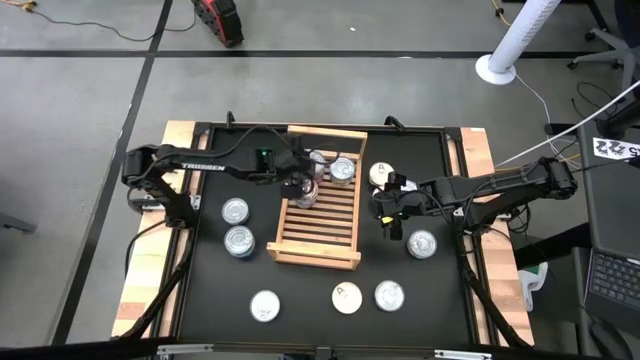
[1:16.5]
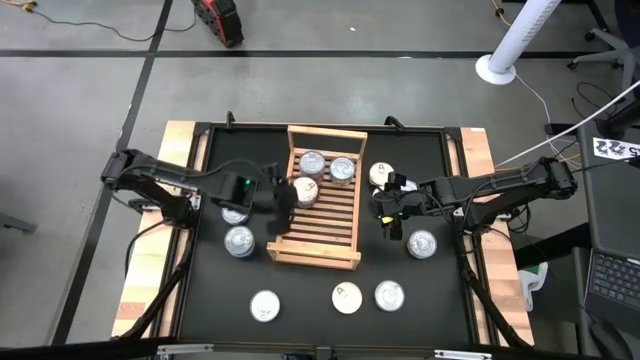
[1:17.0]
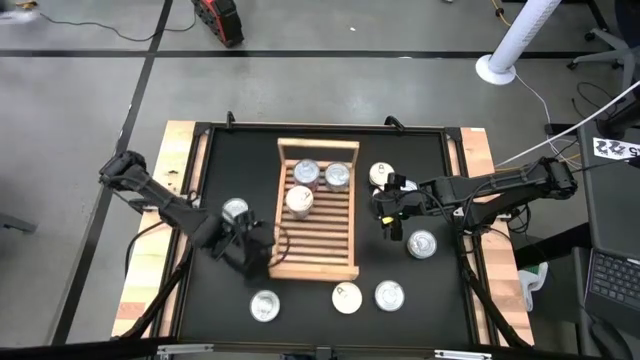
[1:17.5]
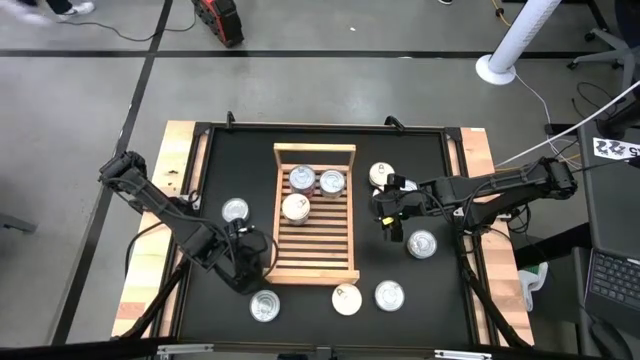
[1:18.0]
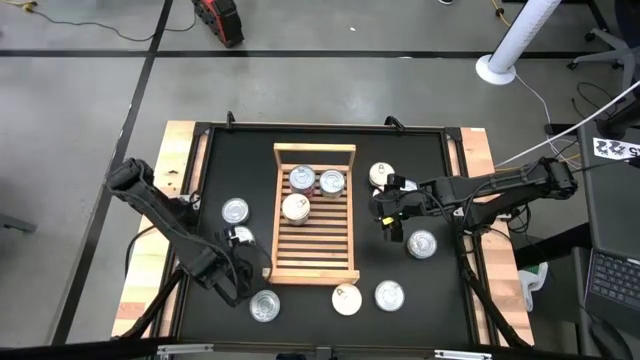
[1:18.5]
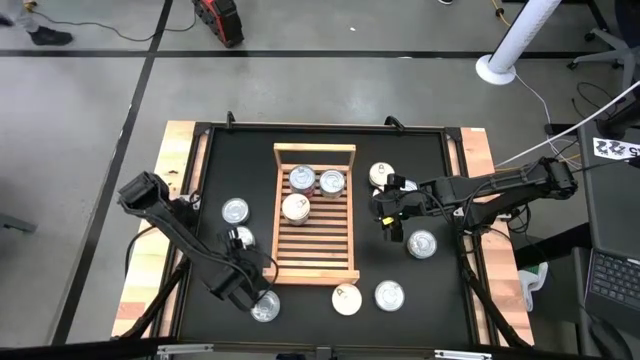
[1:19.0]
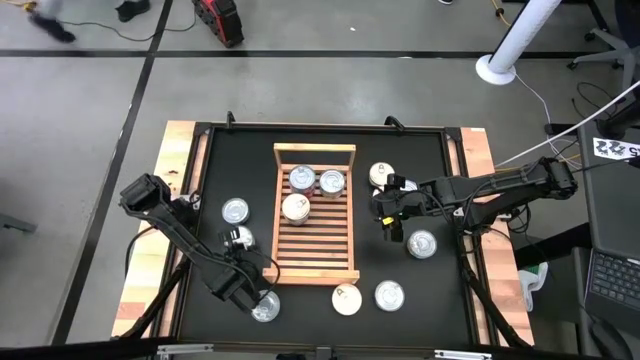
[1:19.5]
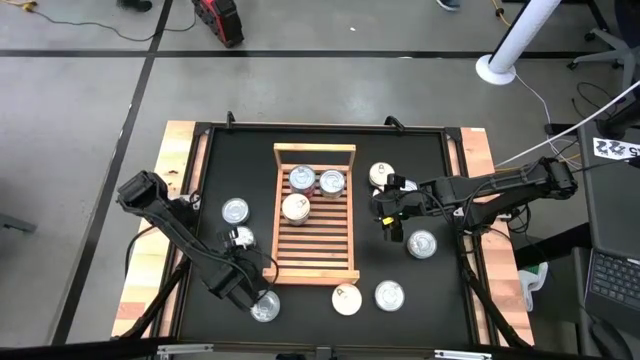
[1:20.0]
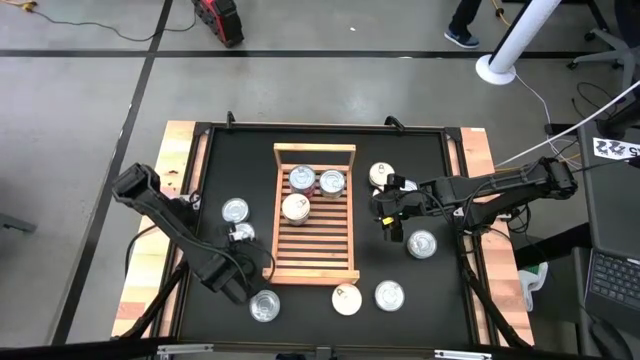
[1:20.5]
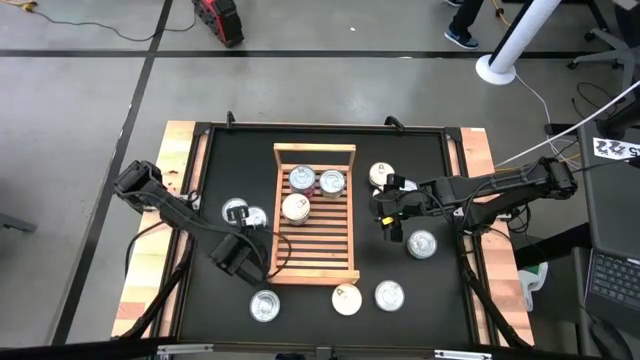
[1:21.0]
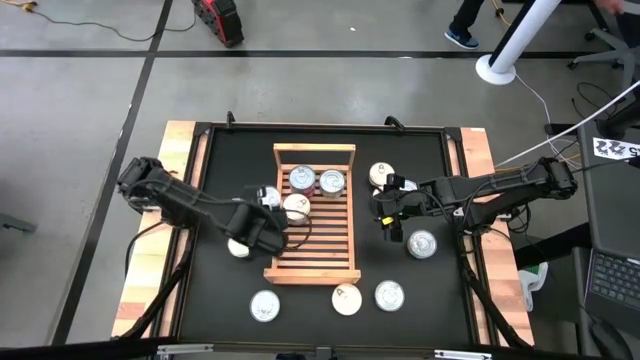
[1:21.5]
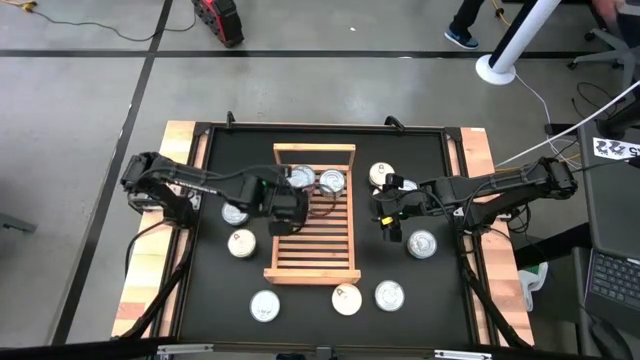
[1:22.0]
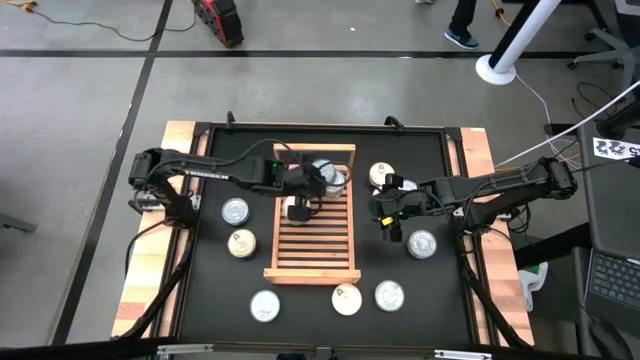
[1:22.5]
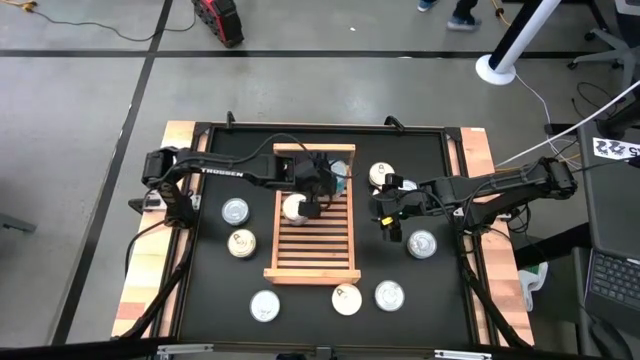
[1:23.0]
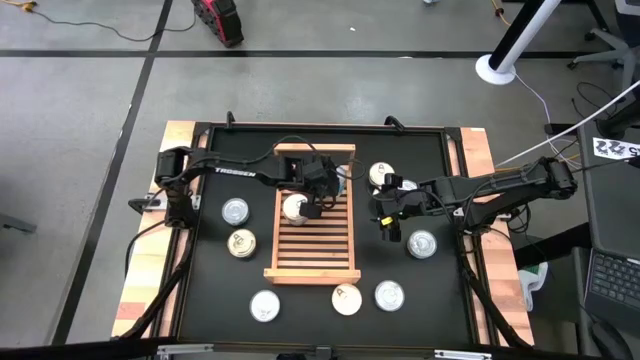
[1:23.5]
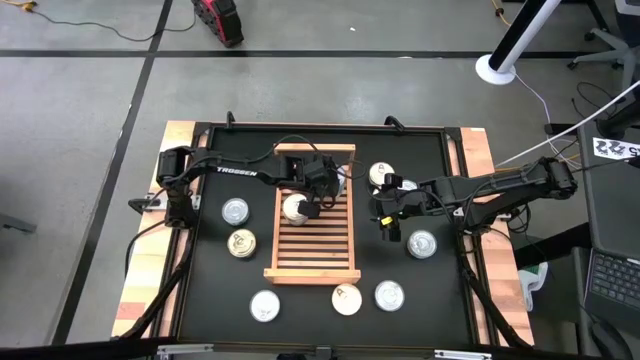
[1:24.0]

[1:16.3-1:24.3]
Task: Stack canned seafood by type on shelf
Stack the yellow and blue tuna can on top of the other yellow and blue tuna cans on the shelf

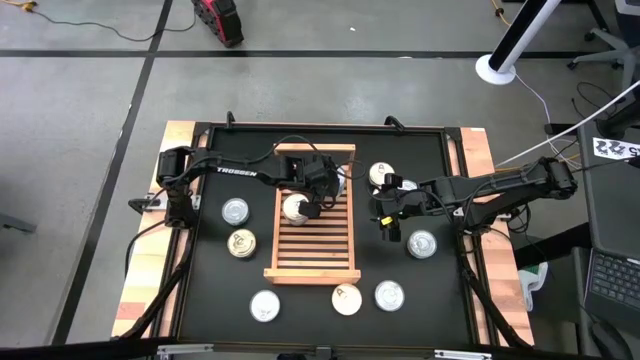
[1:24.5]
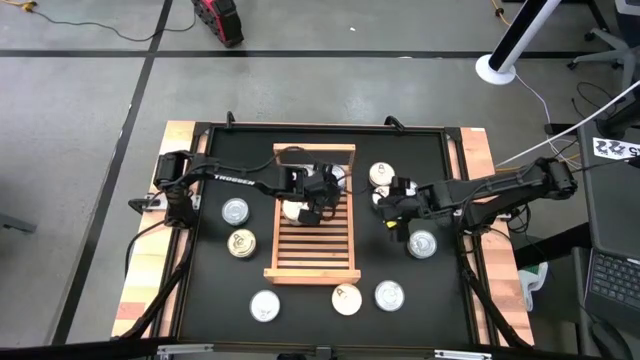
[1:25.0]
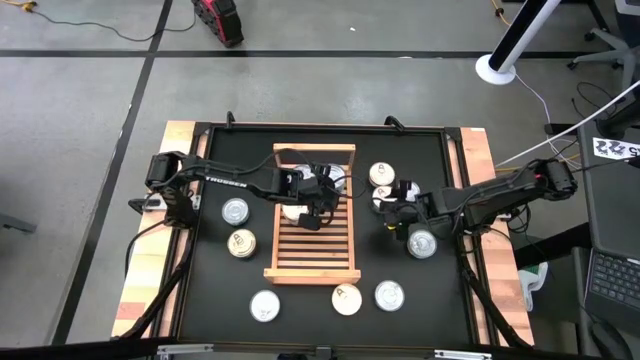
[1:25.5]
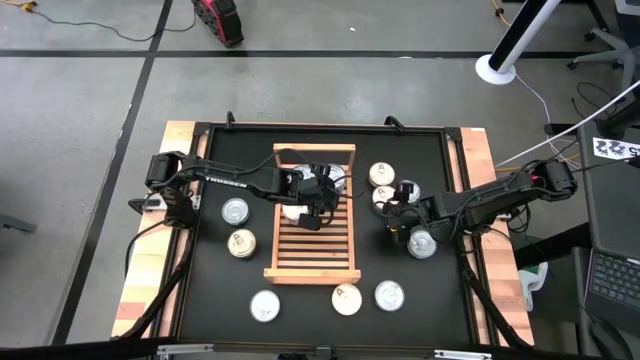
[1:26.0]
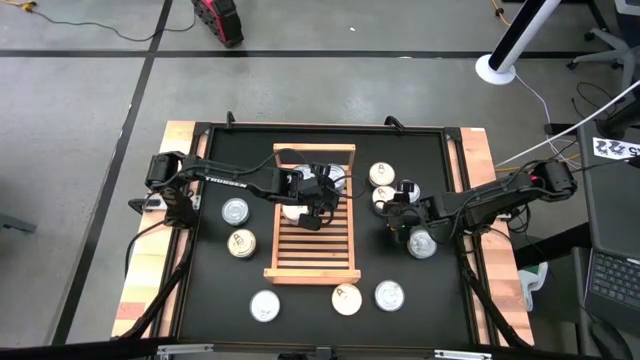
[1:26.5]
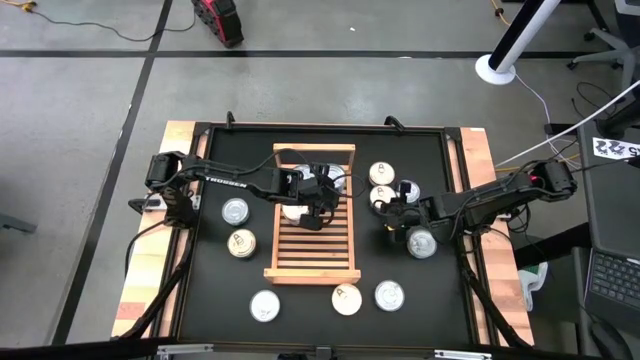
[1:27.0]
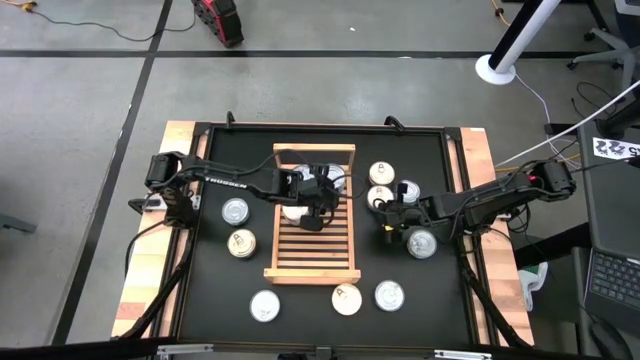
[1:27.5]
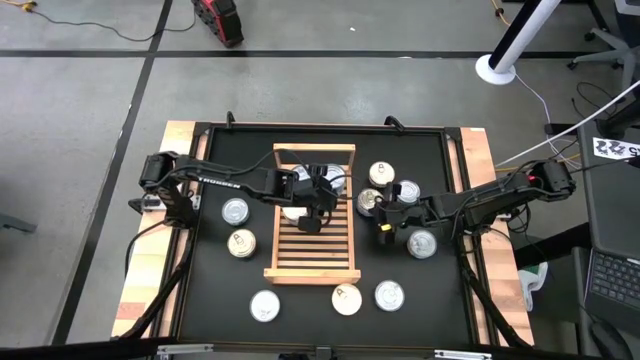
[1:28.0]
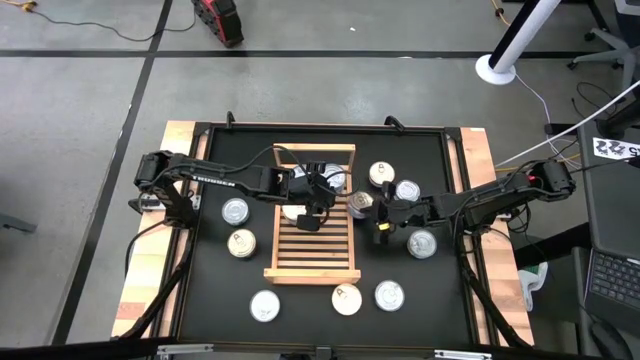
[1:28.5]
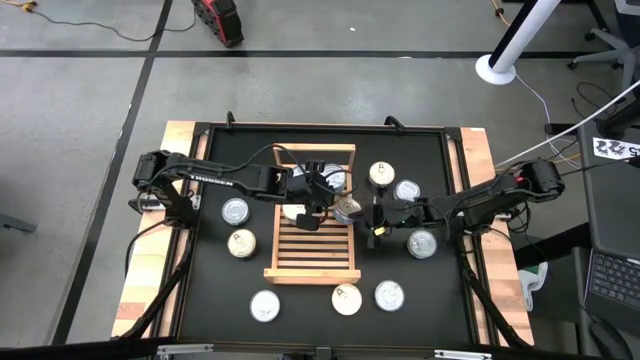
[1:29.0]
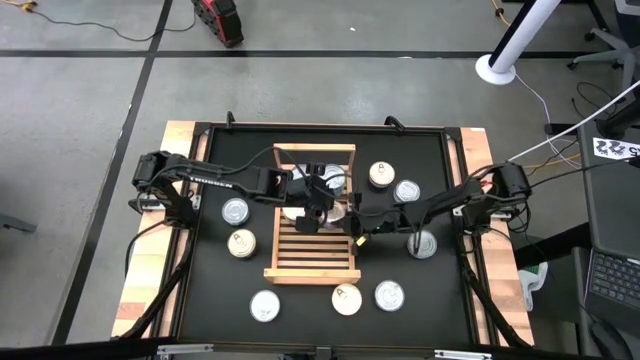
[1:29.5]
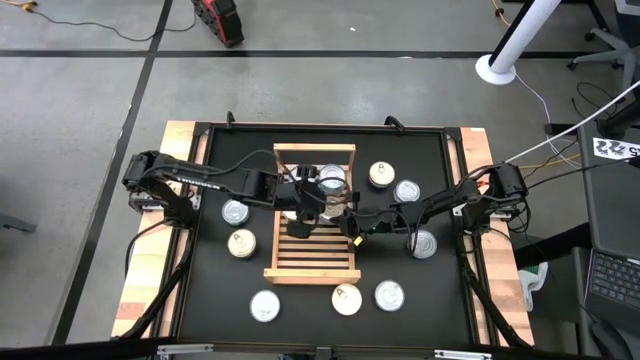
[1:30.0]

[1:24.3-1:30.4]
Put the blue-pink tuna can on the shelf

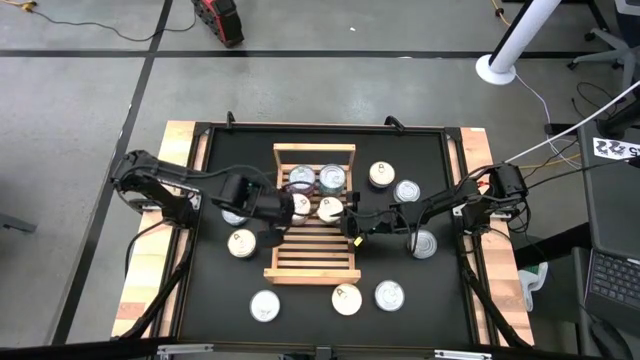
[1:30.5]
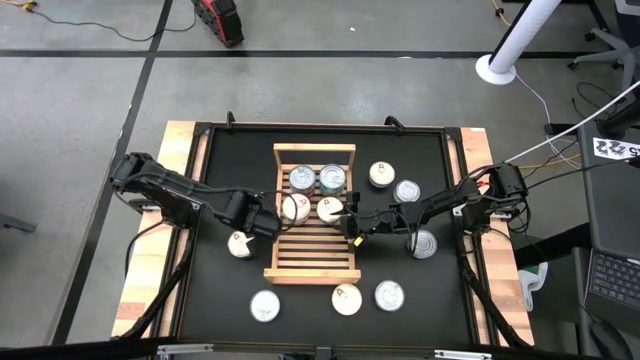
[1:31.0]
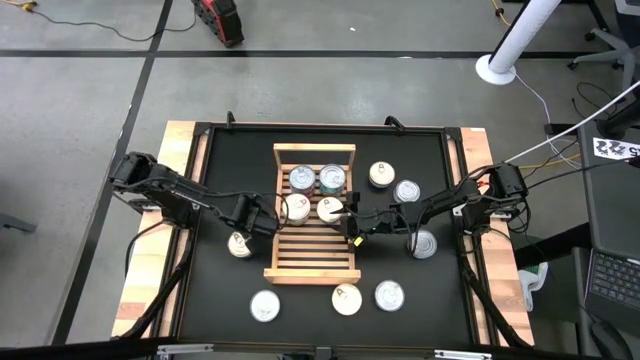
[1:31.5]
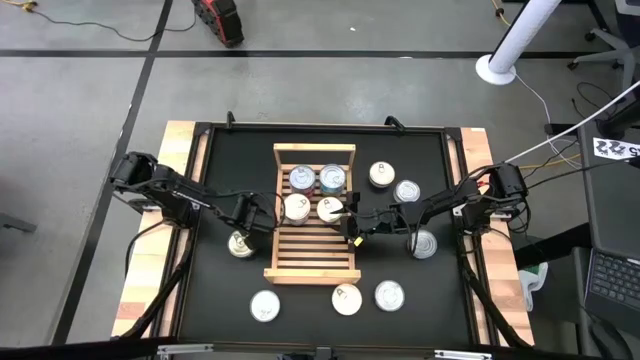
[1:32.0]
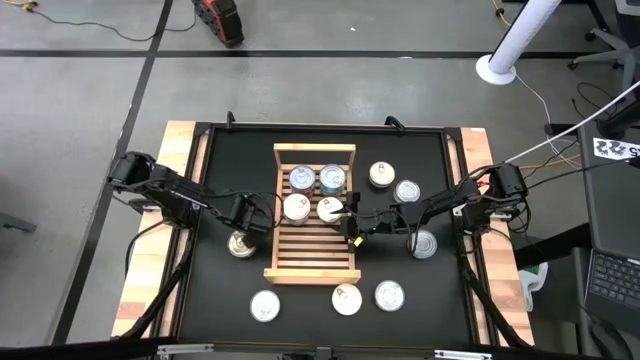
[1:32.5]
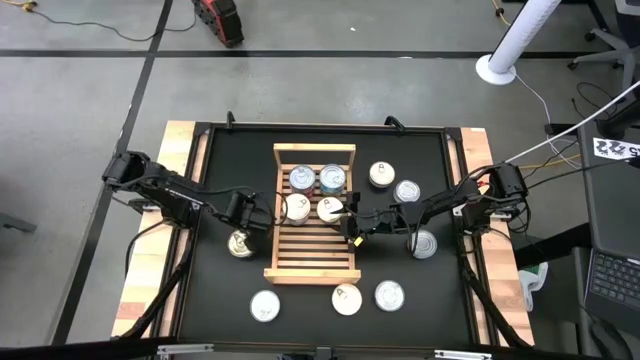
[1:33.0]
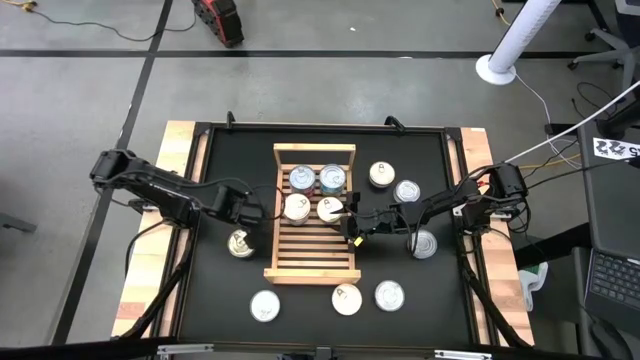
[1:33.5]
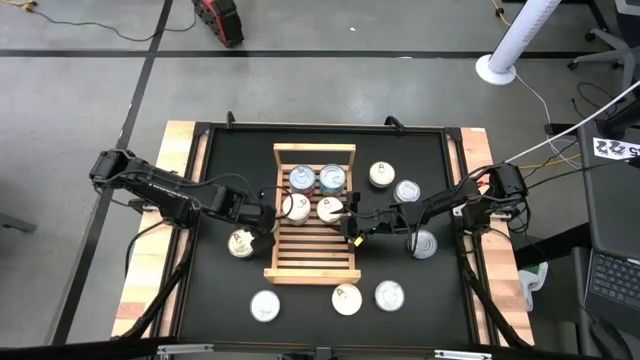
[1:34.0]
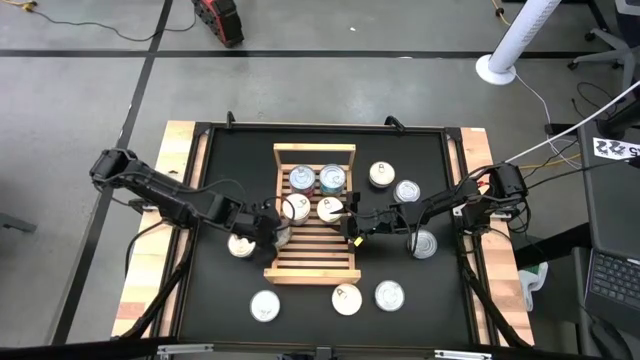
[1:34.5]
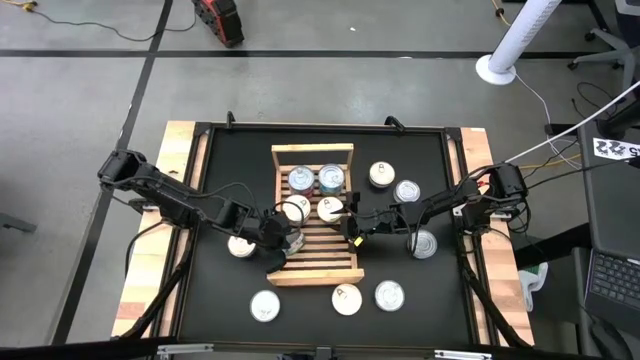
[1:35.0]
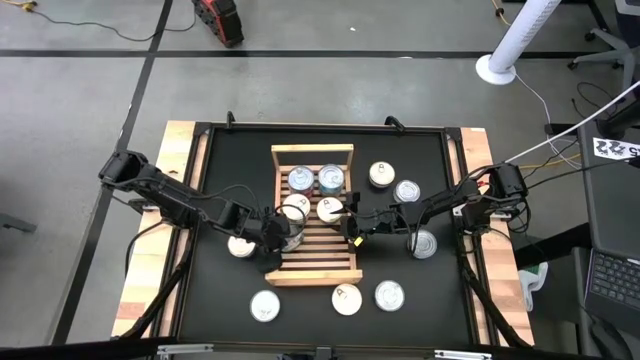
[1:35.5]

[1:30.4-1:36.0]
Put the green tuna can on the shelf

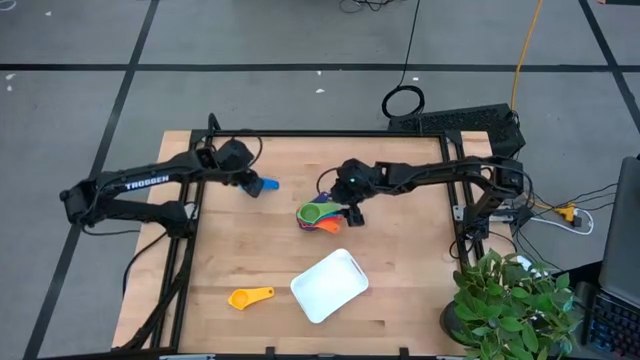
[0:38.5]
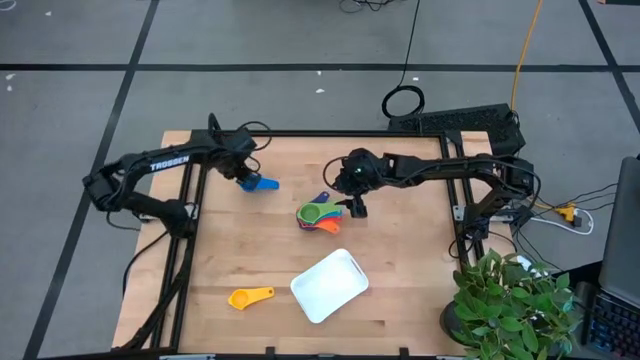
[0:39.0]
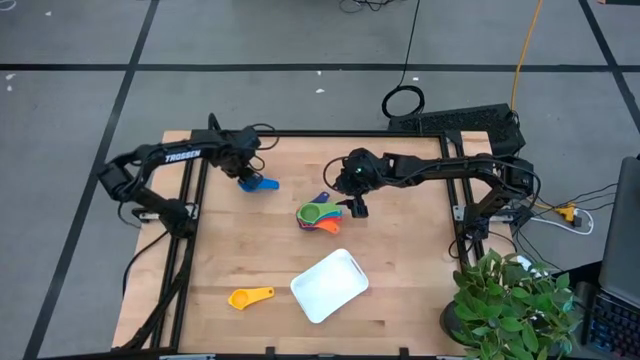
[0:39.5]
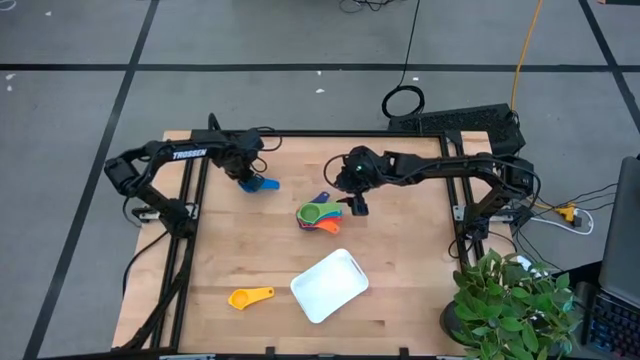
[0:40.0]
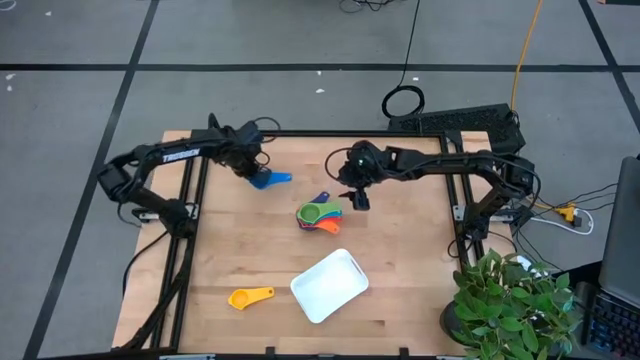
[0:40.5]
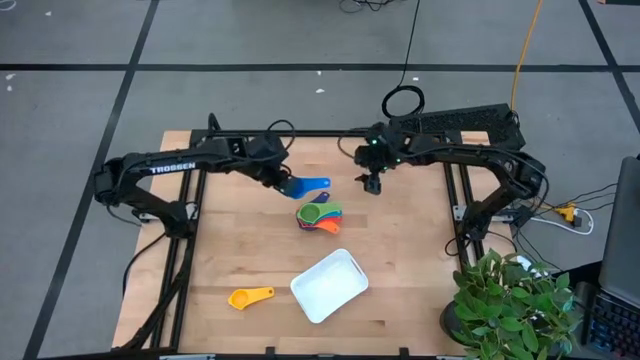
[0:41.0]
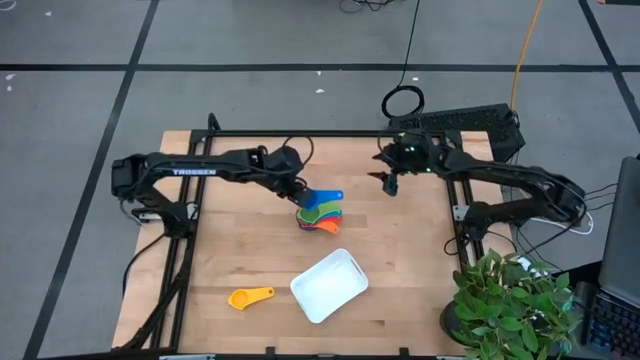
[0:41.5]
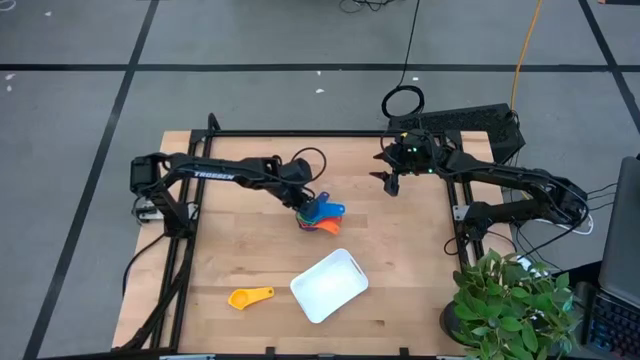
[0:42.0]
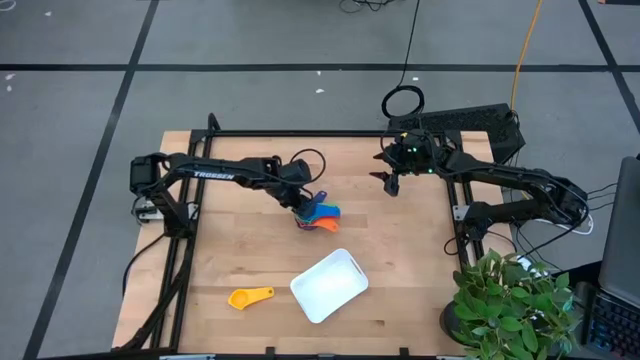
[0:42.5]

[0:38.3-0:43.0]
Task: Nest measuring cups in basket
Stack the blue measuring cup on top of the green measuring cup
